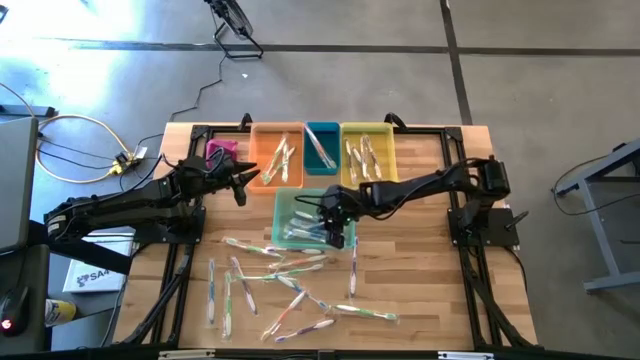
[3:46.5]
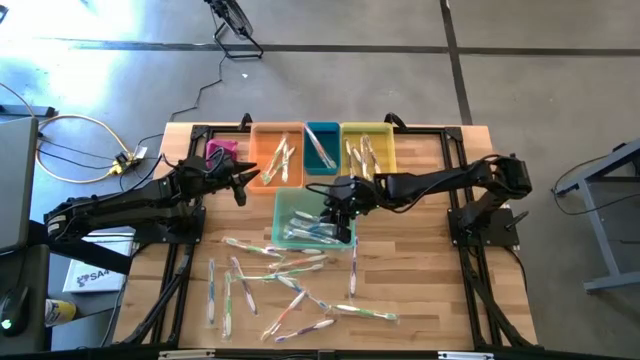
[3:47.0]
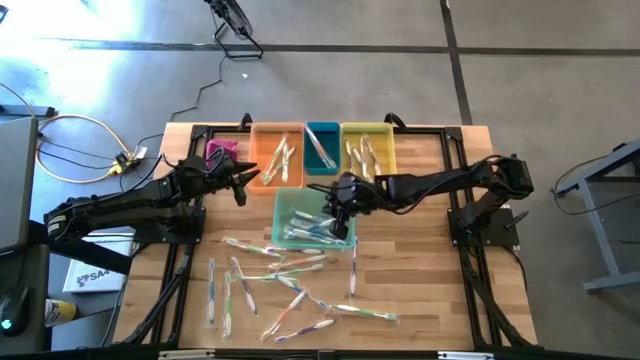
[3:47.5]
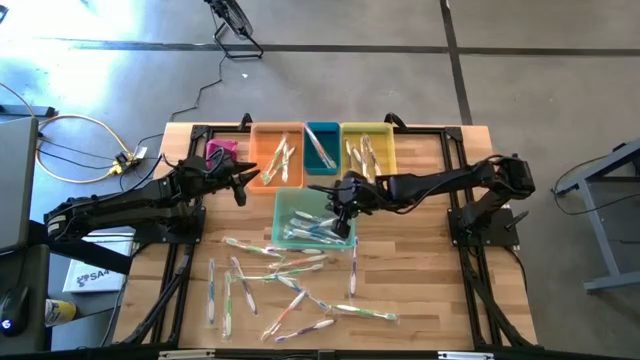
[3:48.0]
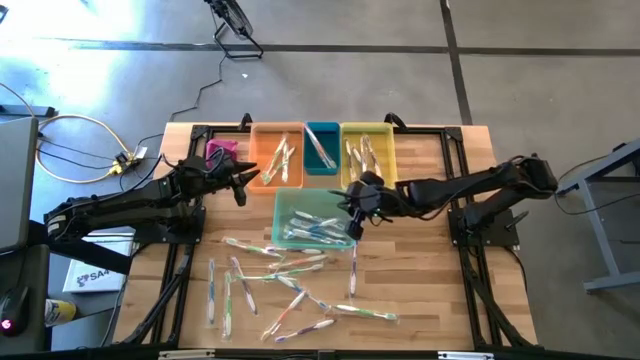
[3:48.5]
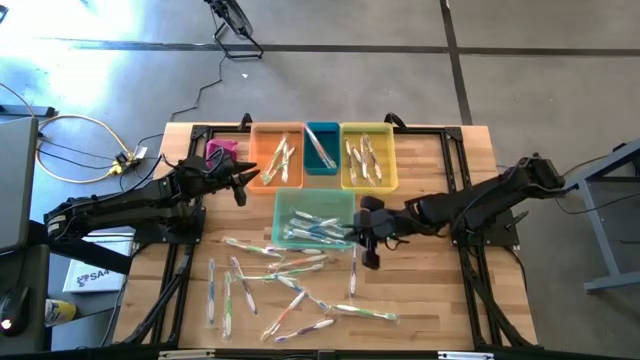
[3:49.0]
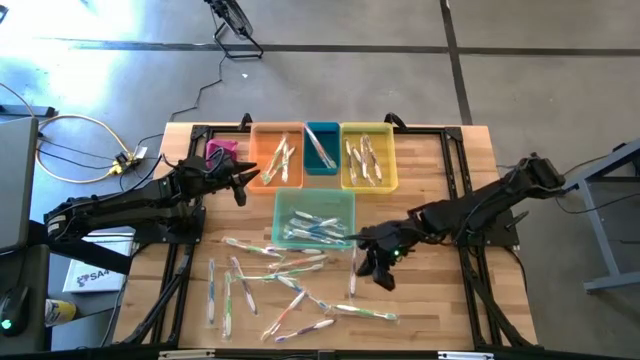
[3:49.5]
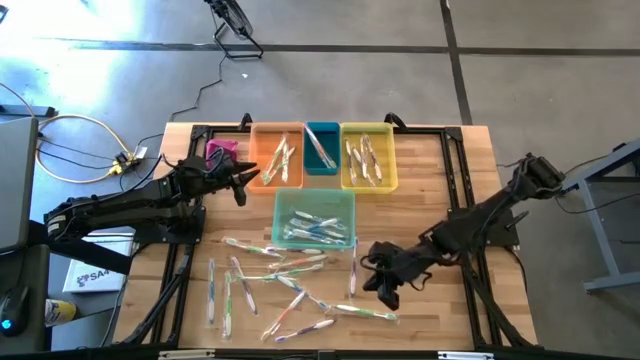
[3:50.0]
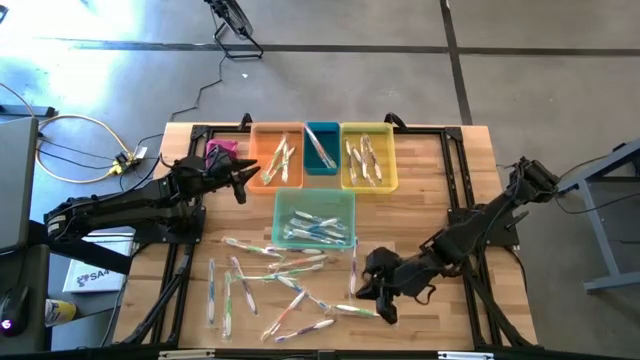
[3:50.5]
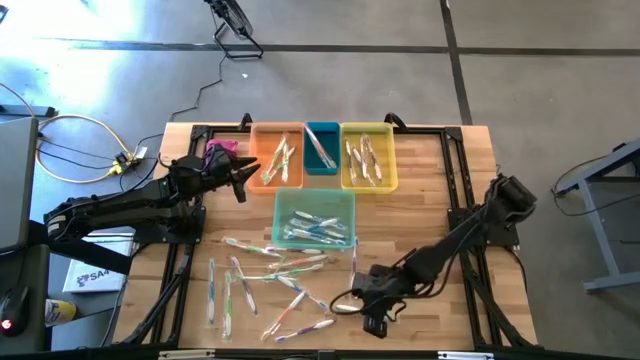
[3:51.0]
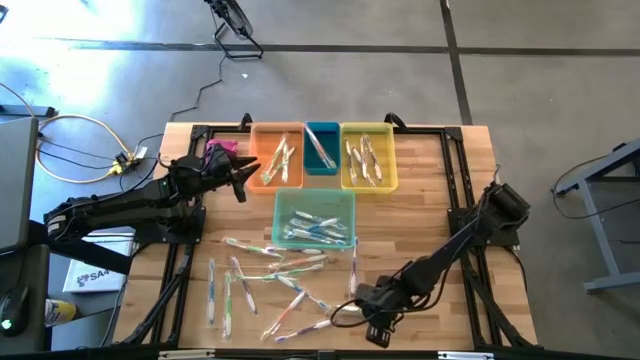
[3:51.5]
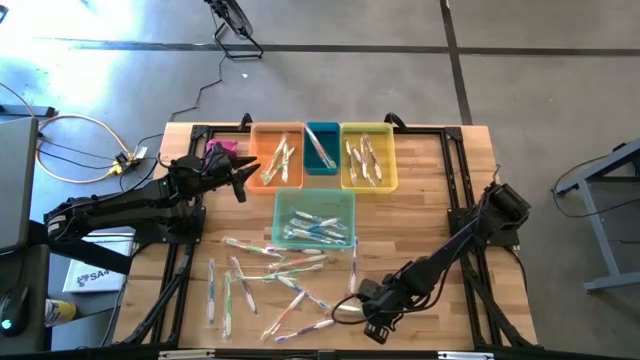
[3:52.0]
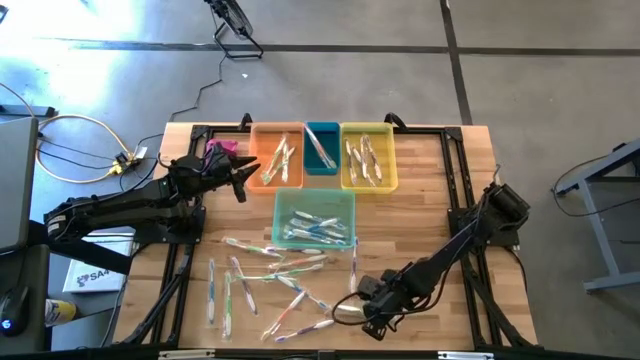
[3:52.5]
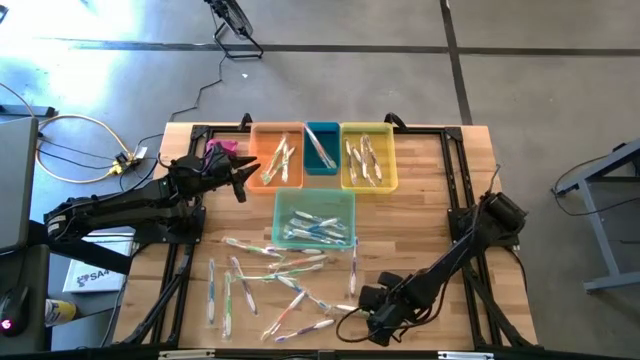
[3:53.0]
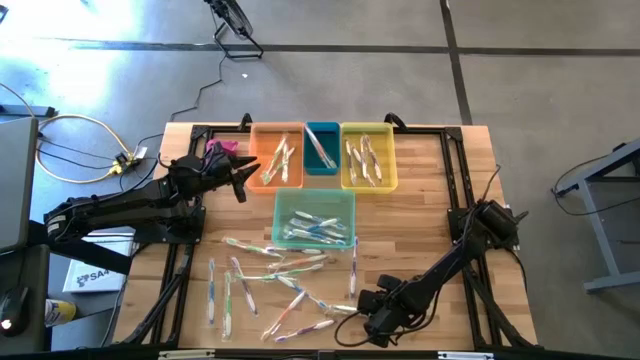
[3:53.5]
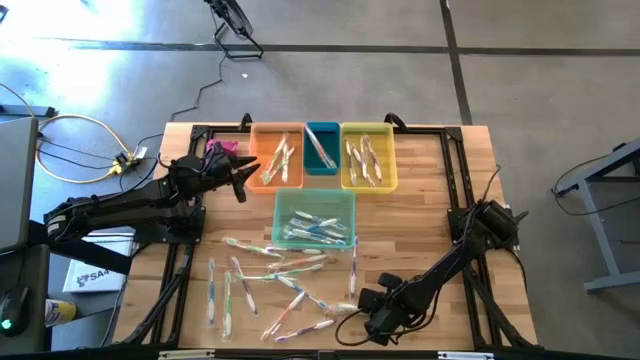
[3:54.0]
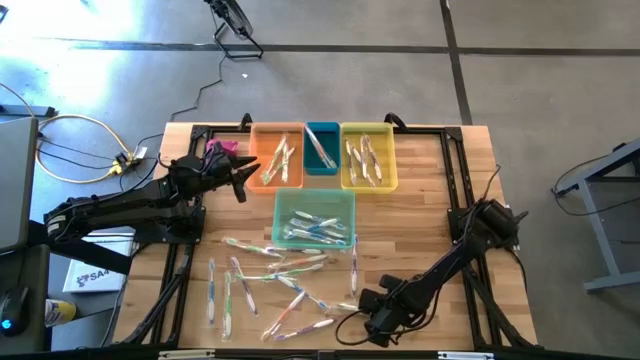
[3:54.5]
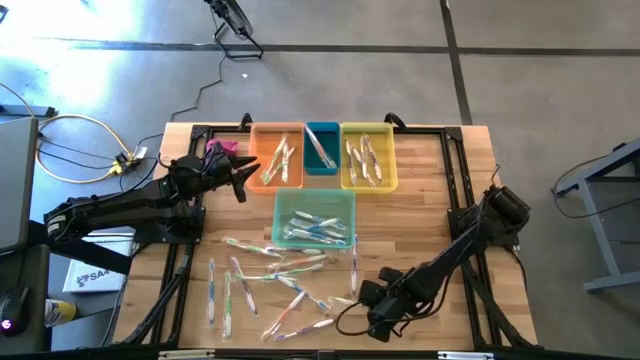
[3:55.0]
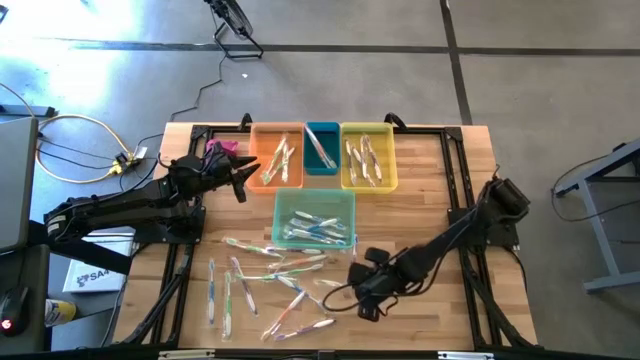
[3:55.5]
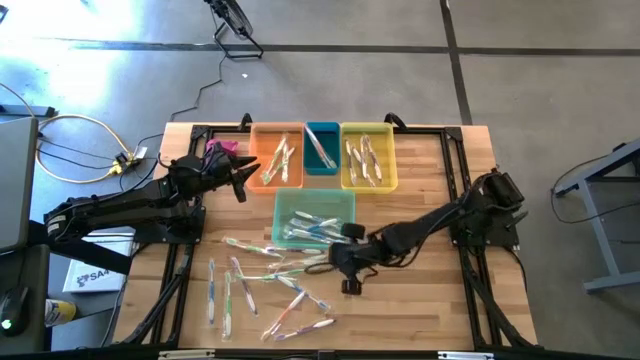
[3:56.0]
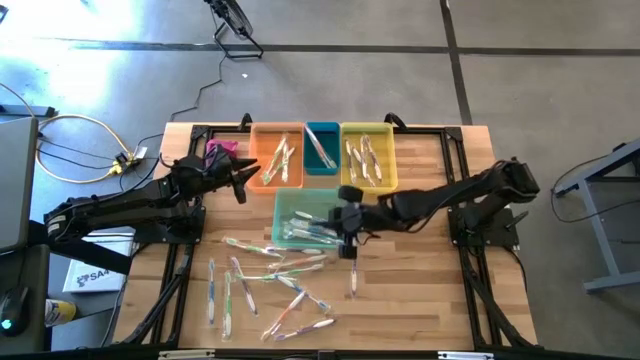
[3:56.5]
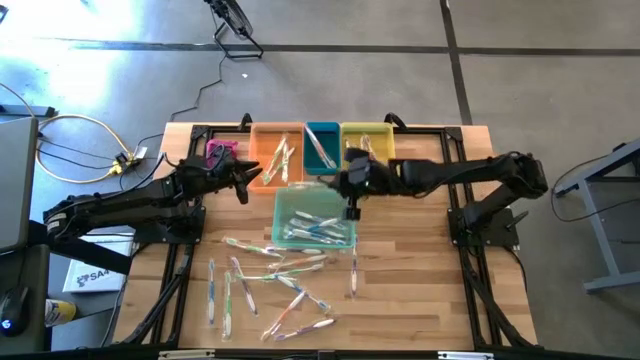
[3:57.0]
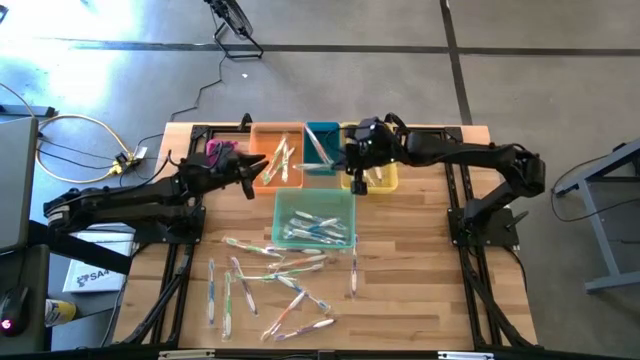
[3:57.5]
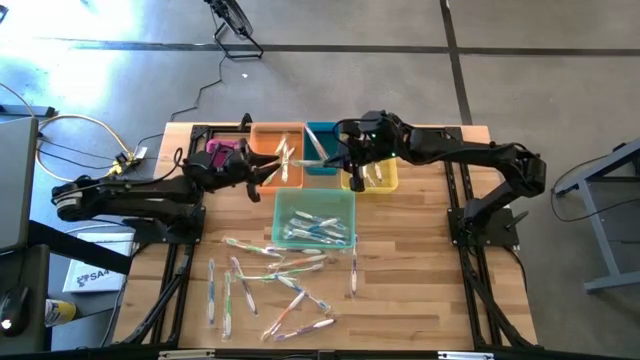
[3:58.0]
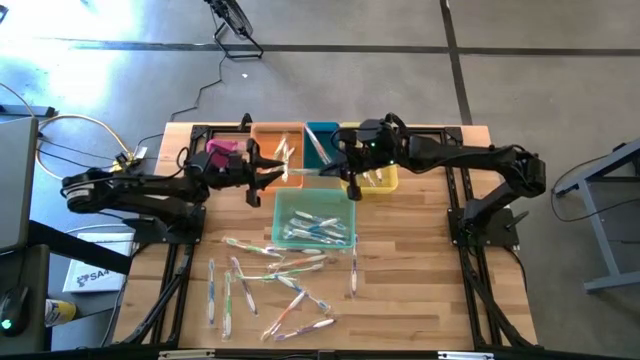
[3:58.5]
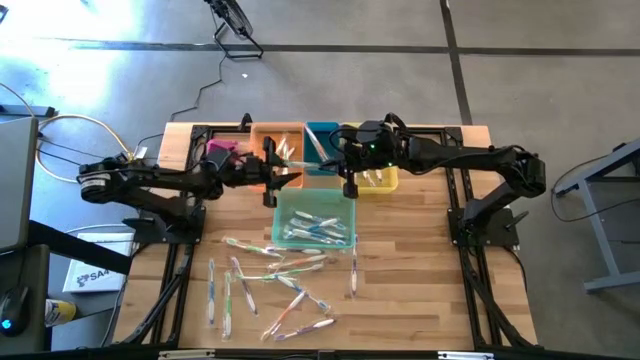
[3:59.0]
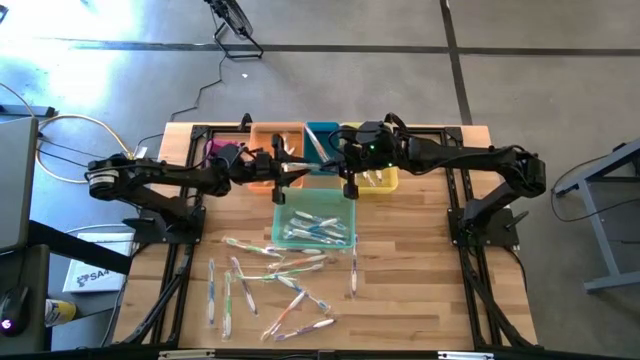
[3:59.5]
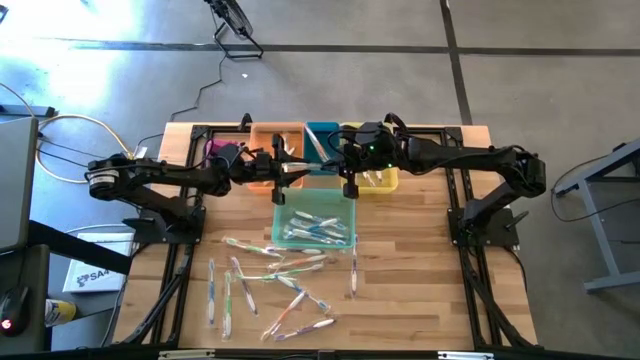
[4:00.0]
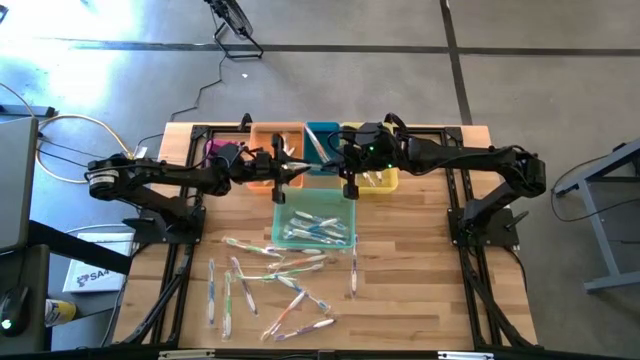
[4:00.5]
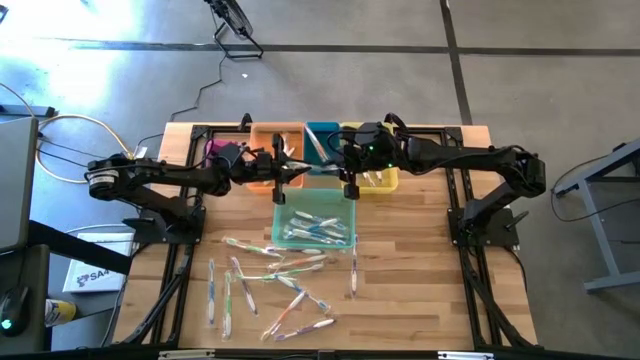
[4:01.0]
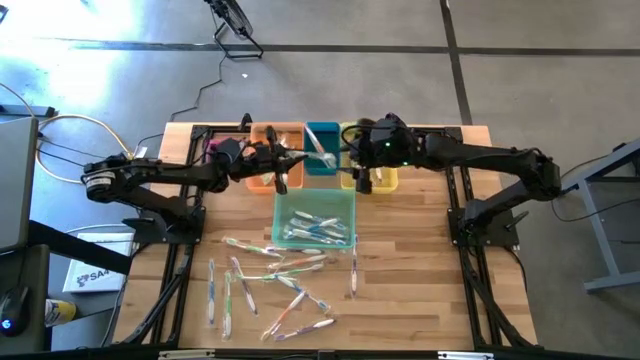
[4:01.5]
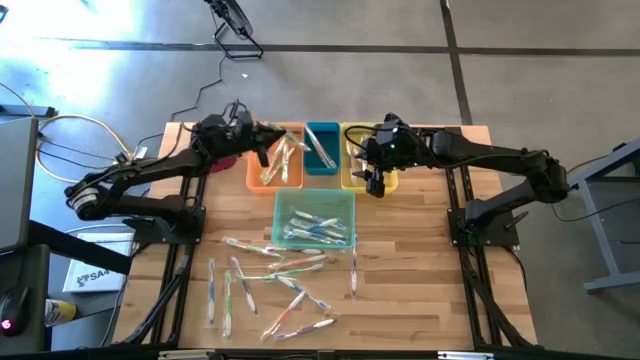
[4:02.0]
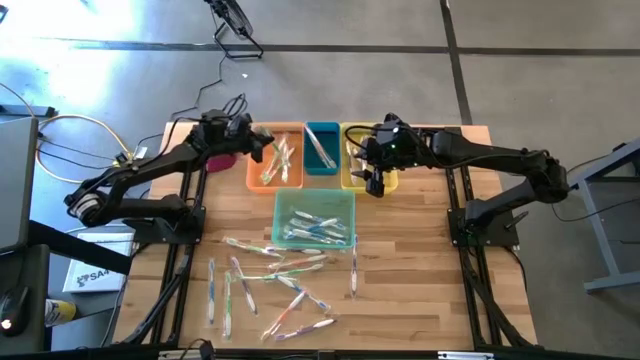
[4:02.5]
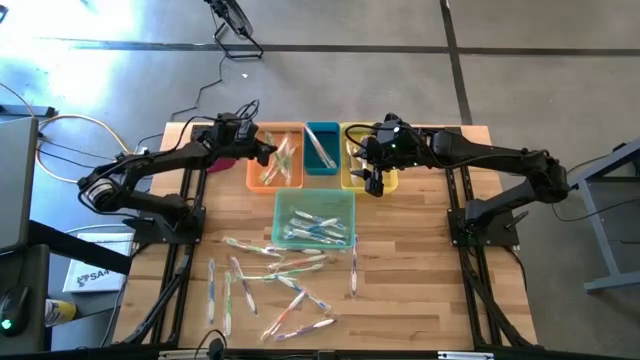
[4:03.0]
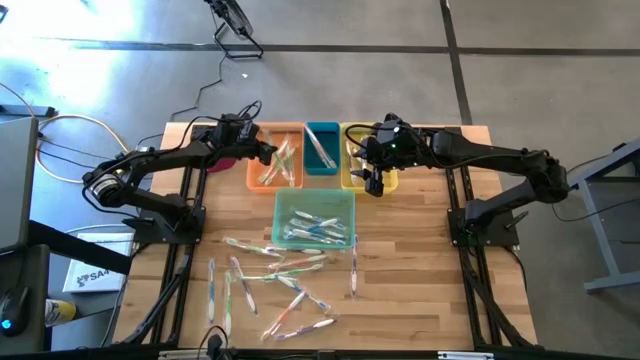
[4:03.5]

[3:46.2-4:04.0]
Task: Pick & Place Toothbrushes
Put the green toothbrush into the orange bin
